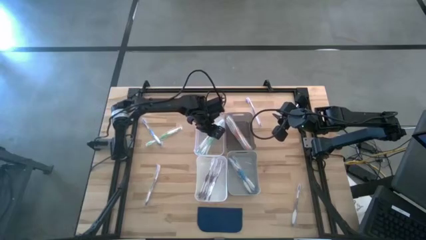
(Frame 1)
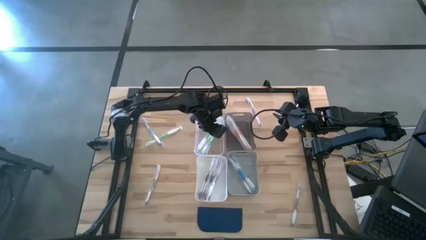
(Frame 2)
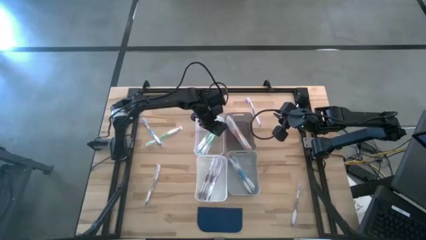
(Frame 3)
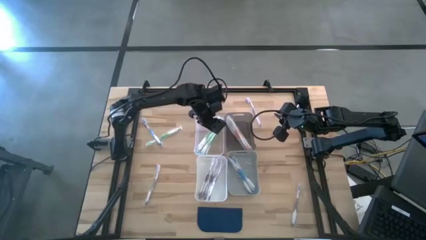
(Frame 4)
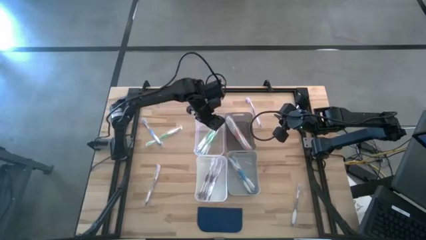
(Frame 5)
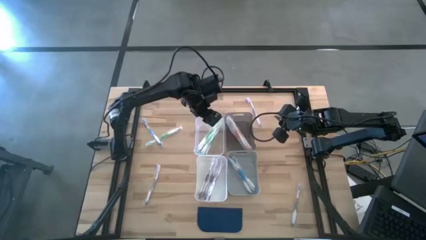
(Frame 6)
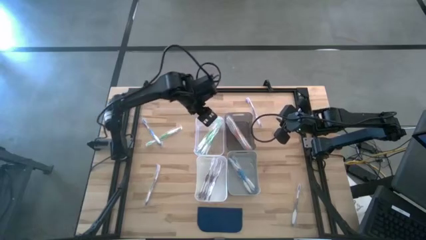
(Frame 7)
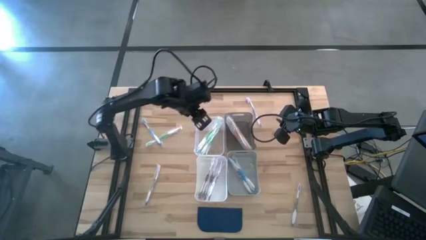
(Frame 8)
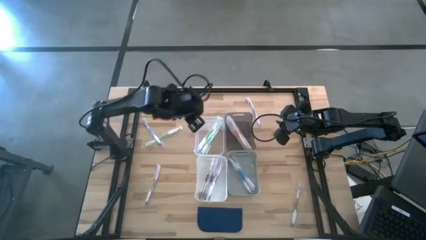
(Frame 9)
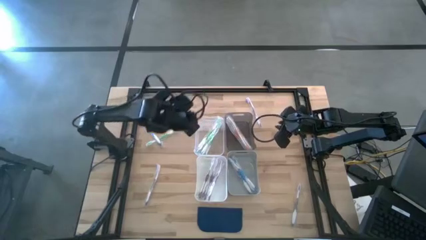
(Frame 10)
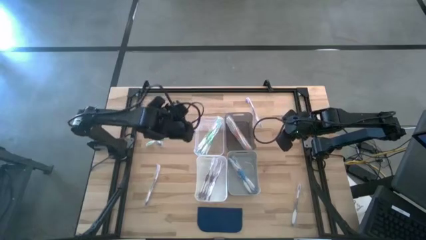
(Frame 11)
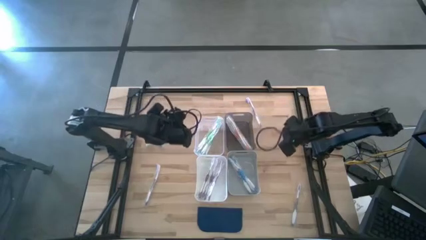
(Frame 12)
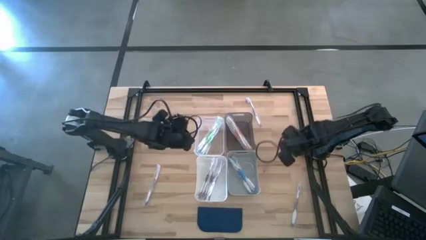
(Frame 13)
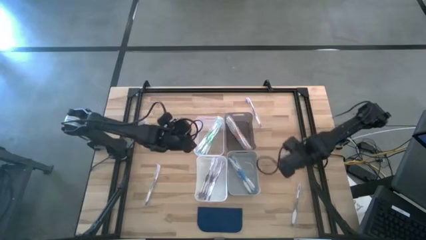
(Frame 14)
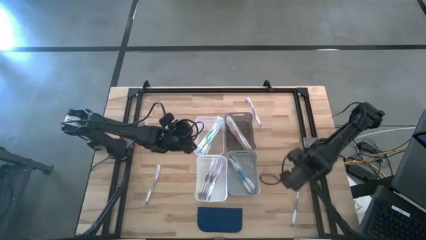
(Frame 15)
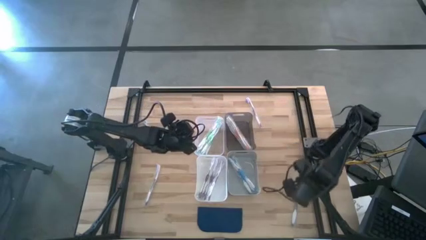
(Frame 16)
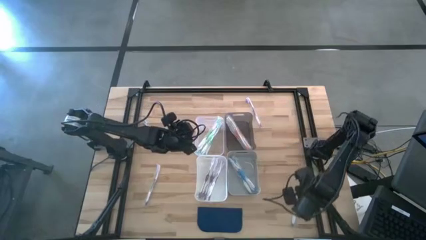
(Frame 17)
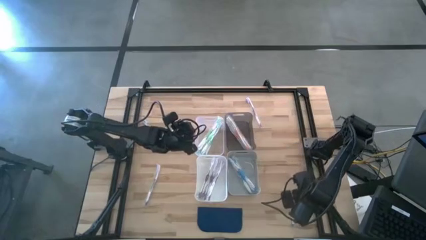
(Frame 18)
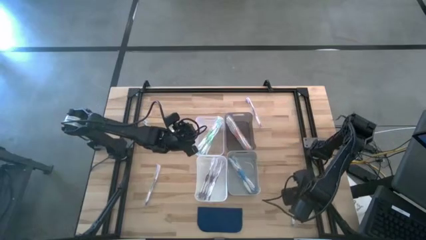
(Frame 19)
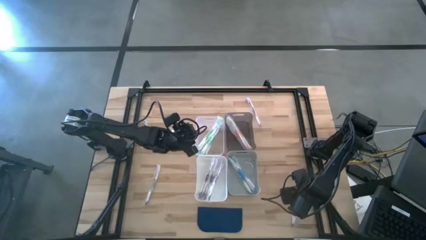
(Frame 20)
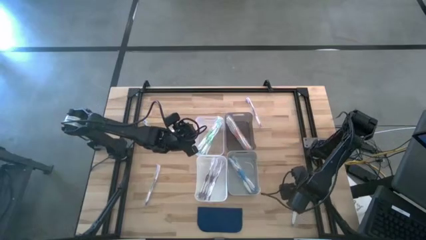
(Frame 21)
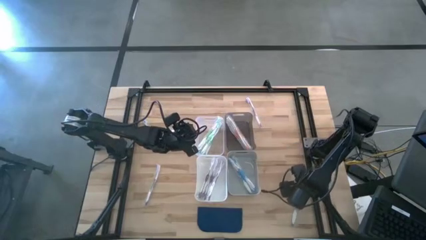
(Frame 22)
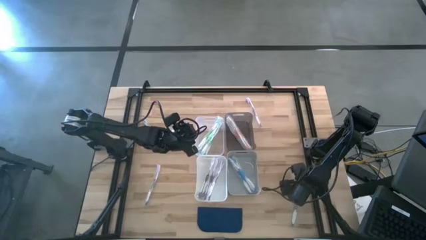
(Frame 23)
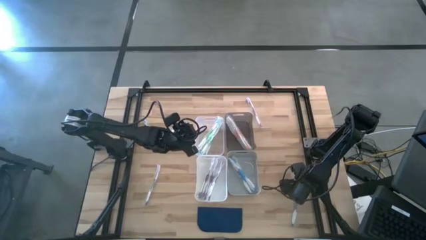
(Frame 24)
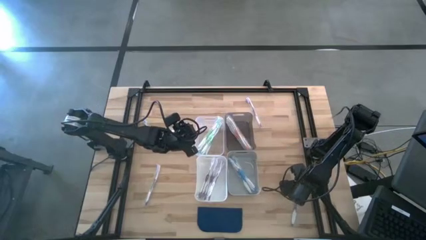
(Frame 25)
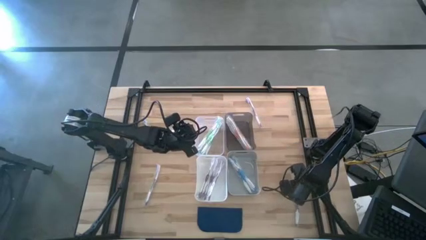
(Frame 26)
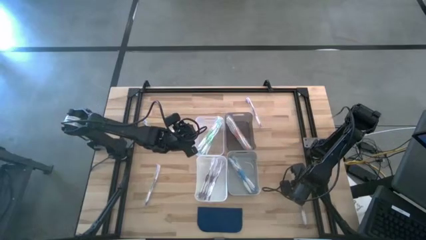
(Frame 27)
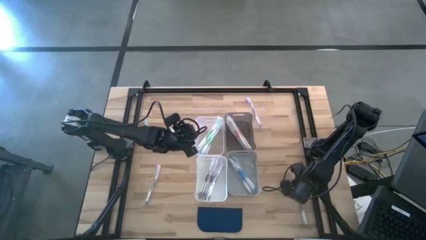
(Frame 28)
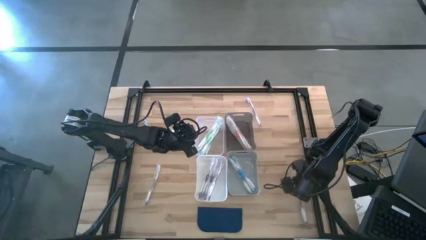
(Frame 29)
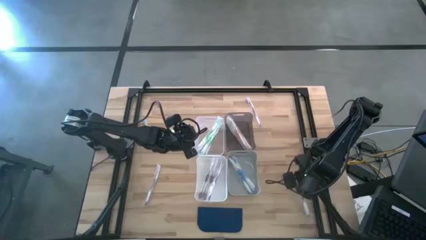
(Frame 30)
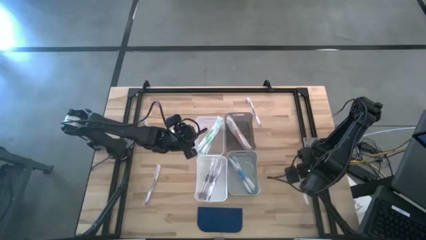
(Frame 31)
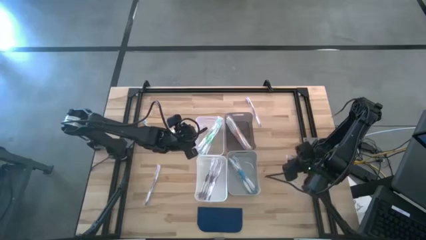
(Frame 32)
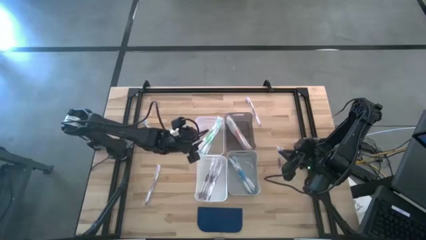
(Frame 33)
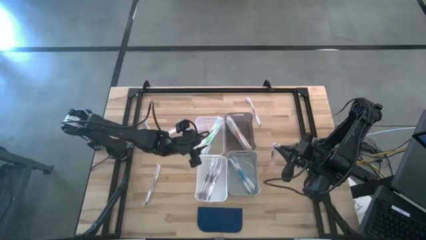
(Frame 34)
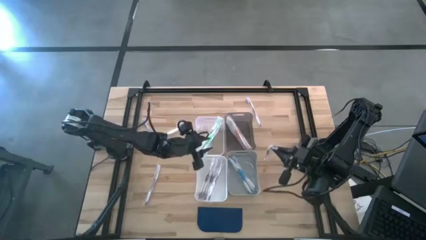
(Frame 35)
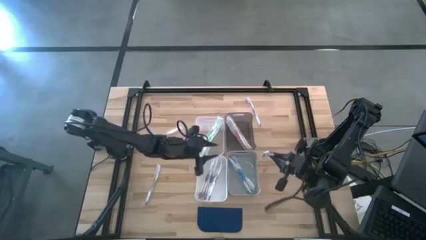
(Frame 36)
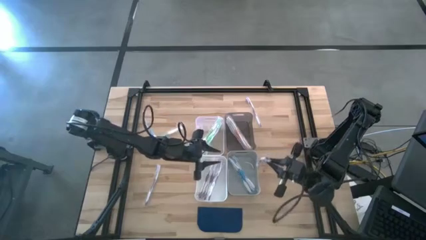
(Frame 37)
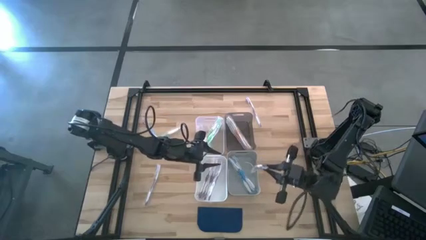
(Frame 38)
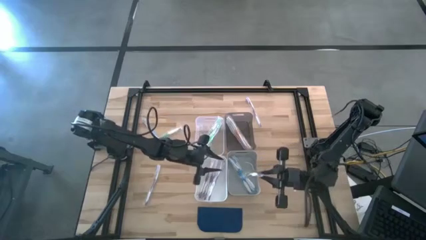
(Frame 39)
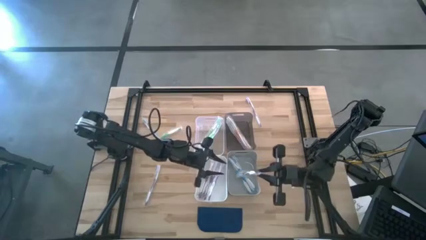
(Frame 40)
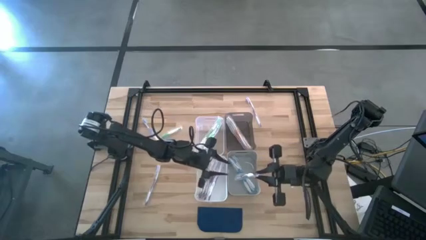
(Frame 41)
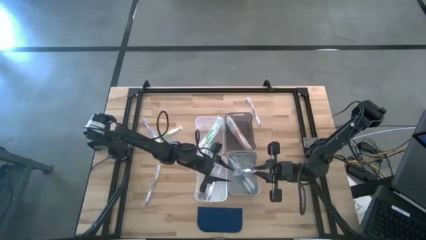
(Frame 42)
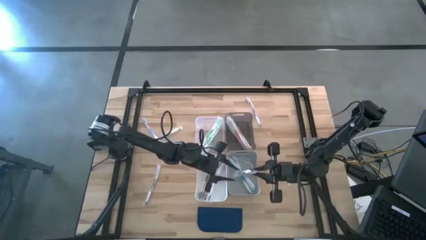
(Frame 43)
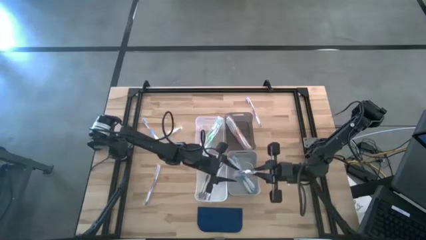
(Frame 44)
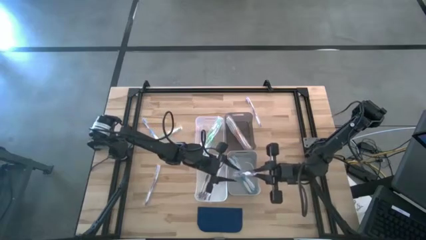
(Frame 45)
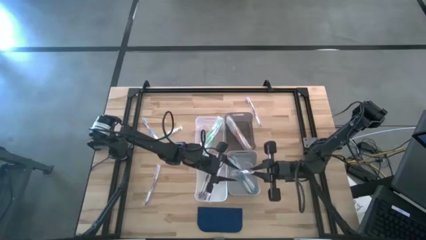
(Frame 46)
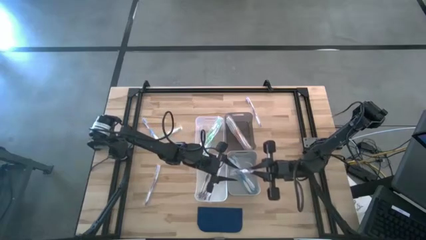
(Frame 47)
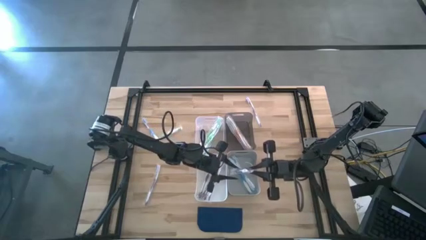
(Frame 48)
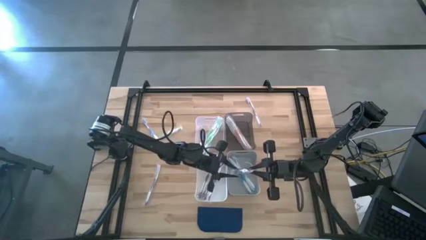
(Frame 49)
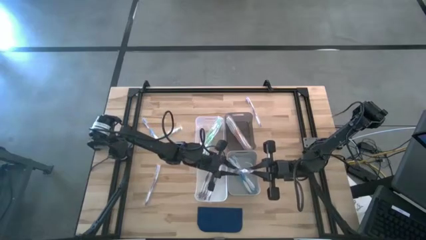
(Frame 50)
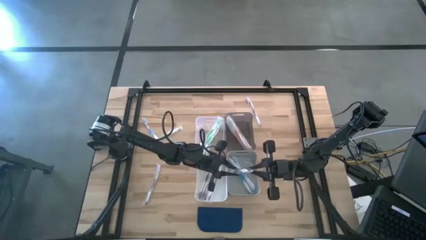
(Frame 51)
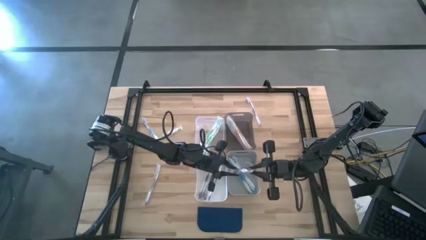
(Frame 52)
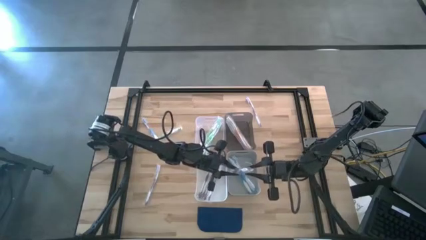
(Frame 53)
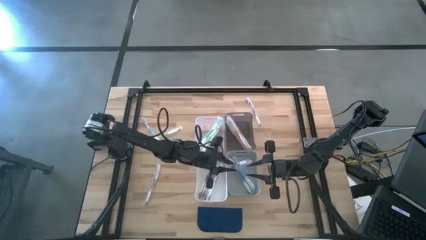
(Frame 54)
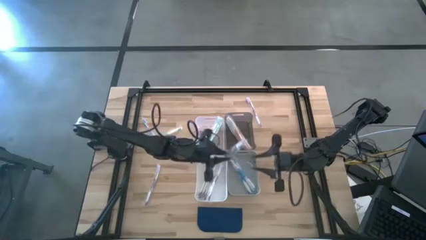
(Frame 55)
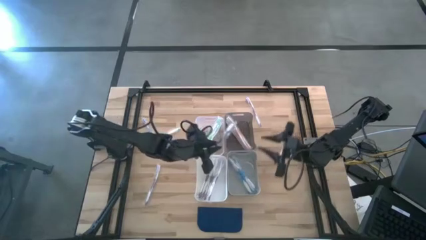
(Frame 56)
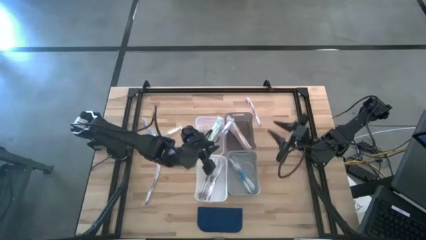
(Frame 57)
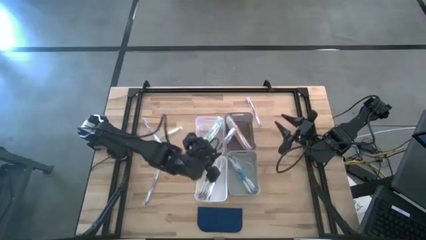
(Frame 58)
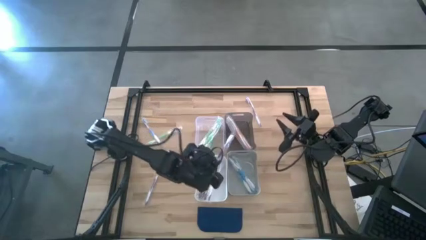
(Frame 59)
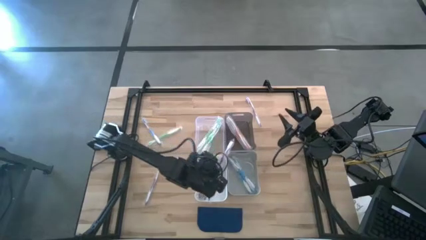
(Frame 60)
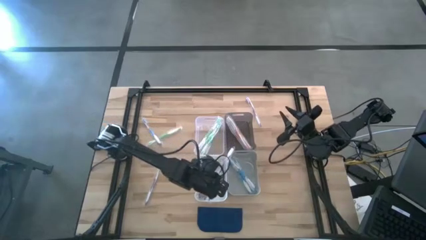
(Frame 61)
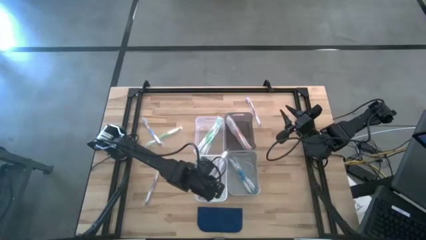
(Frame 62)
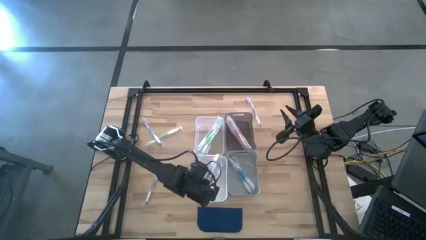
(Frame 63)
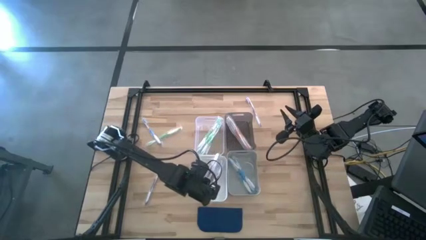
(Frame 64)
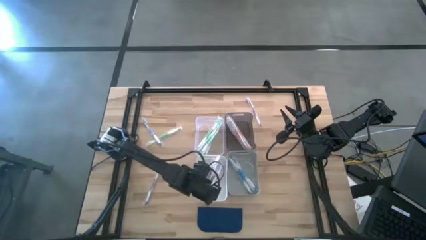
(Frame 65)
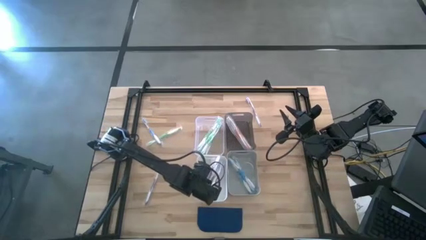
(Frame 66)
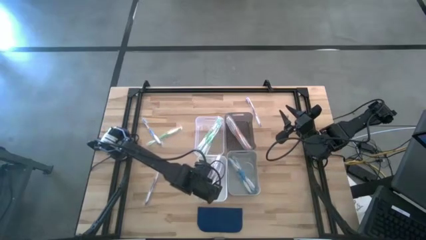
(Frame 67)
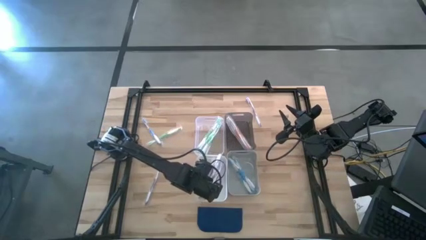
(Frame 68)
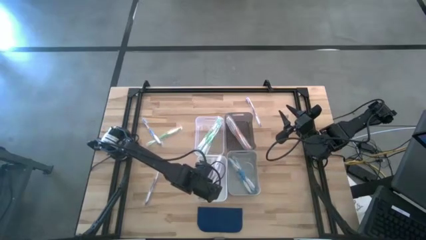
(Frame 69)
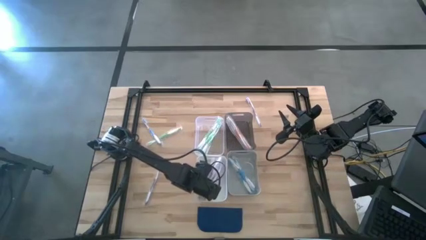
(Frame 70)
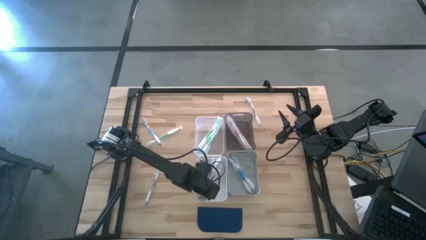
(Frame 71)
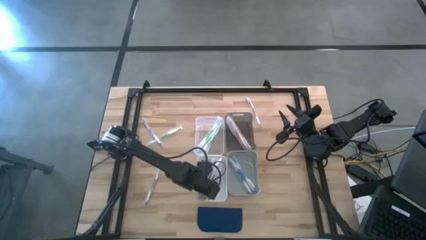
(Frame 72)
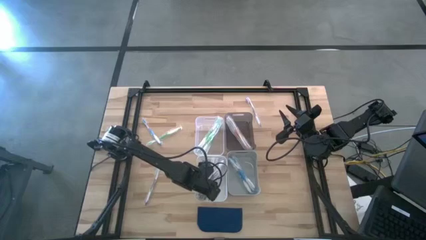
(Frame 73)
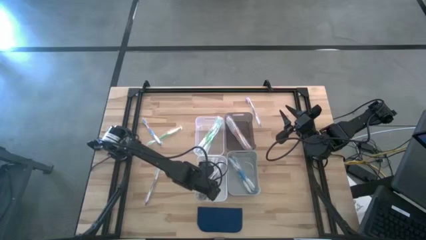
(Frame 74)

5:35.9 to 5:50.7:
Task: Pick & Place Toothbrushes
Put the violet toothbrush into the white bin

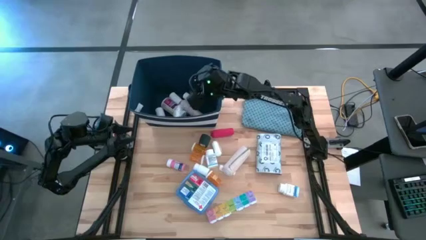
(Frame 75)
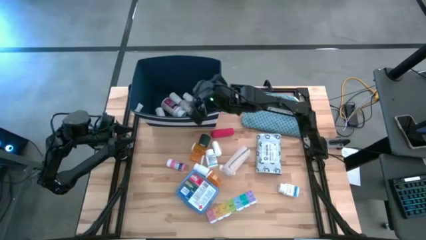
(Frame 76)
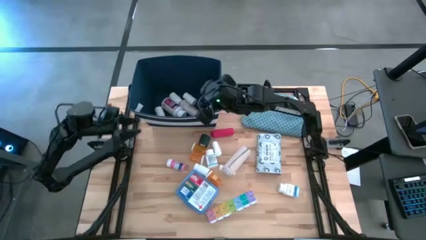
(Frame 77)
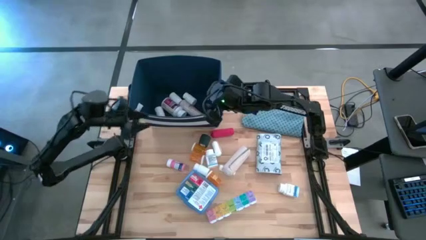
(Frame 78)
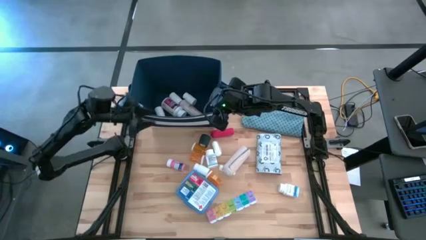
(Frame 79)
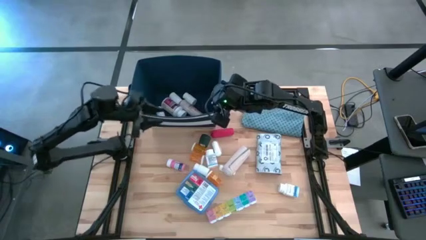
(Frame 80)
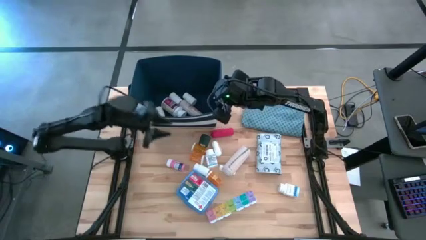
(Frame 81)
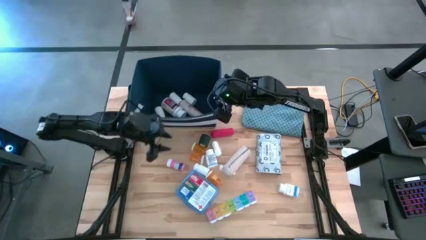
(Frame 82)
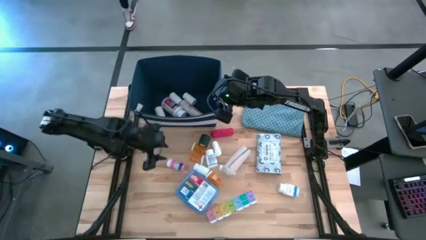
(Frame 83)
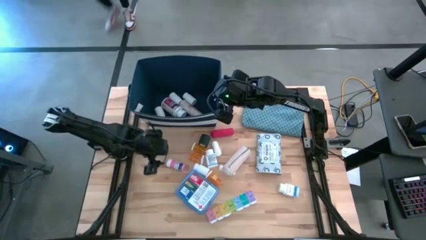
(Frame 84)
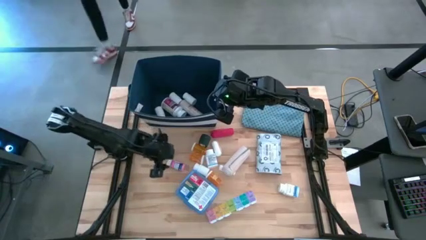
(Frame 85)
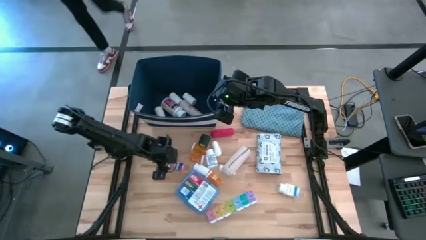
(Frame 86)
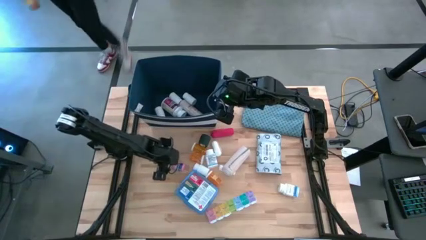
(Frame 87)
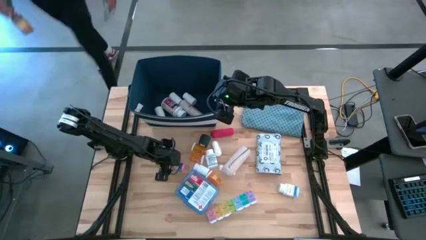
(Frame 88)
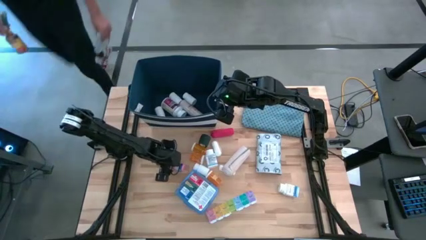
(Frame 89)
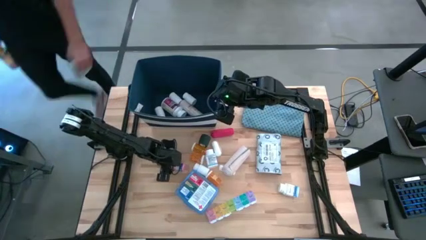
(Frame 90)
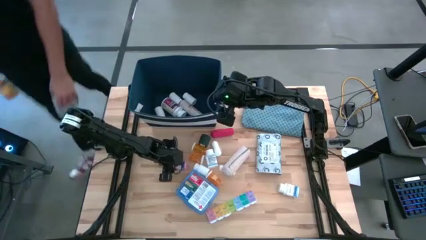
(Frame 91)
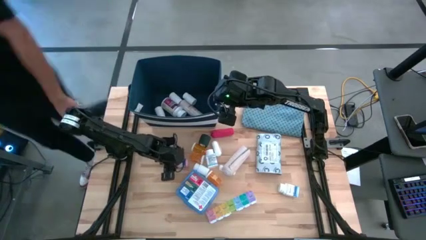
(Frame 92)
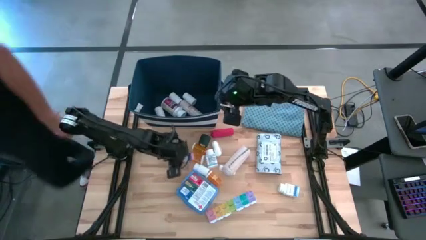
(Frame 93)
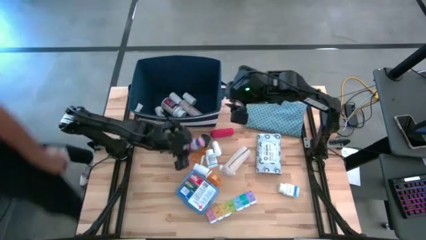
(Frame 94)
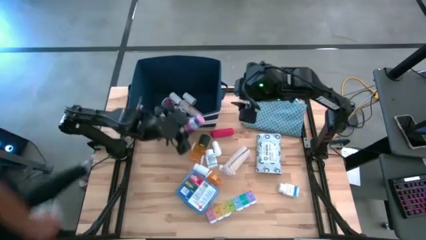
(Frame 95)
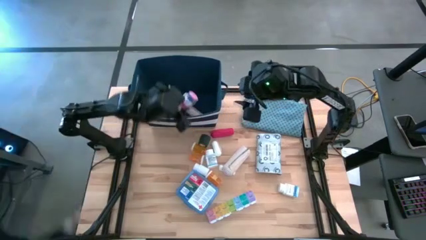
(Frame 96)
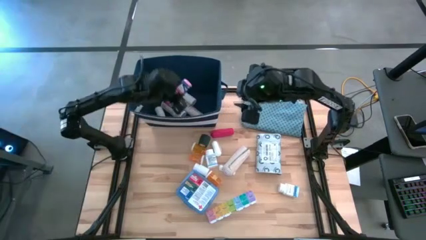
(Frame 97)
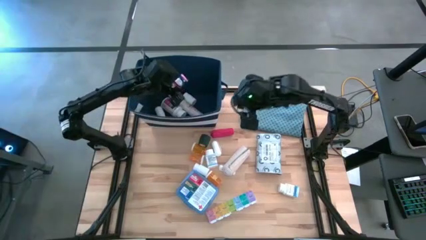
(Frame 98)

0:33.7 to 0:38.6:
Task: Pick & place medical supplies in basket/bin
Put the pink pill bottle into the blue bin
